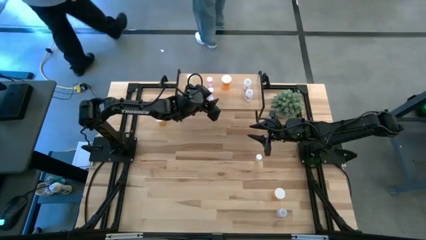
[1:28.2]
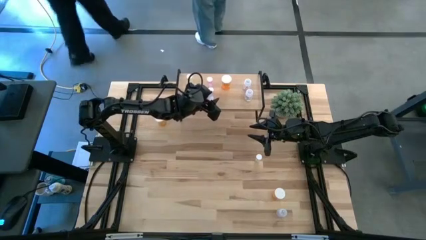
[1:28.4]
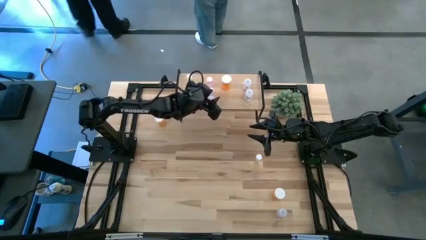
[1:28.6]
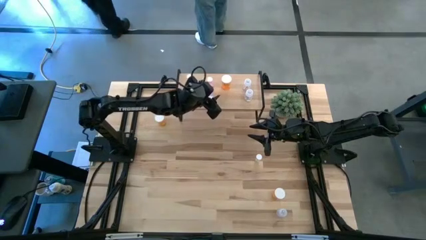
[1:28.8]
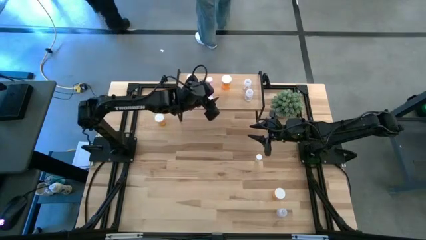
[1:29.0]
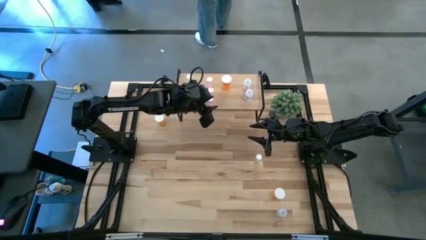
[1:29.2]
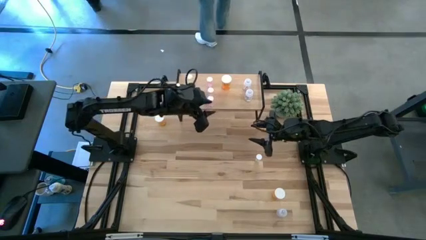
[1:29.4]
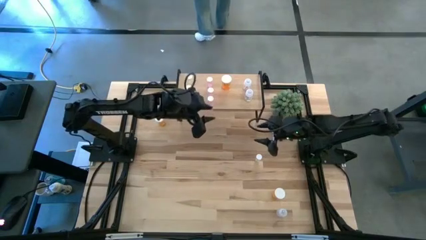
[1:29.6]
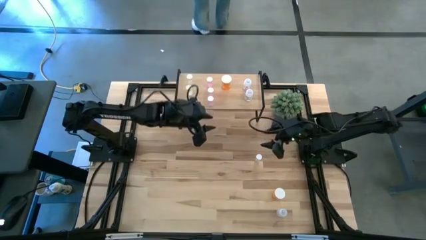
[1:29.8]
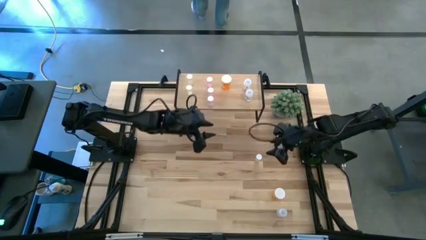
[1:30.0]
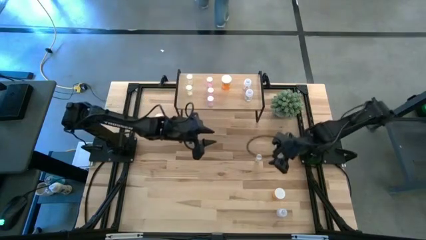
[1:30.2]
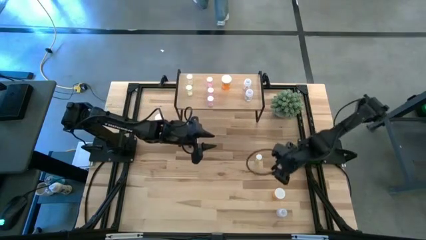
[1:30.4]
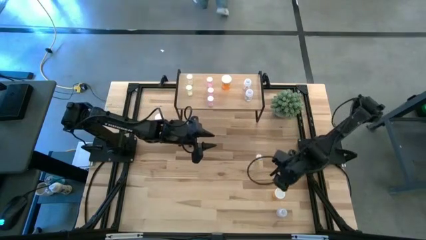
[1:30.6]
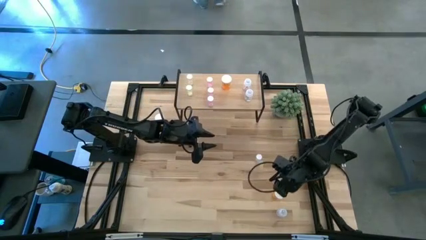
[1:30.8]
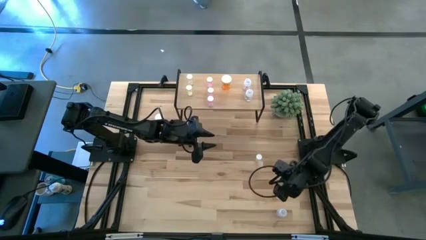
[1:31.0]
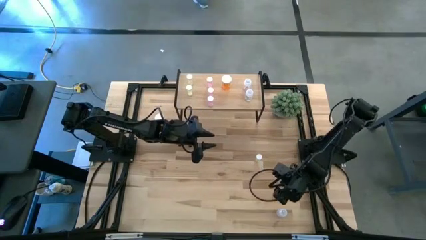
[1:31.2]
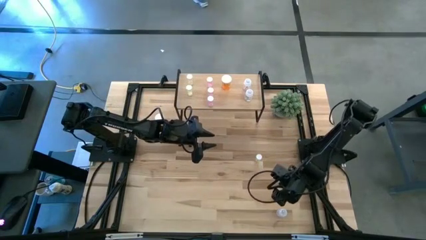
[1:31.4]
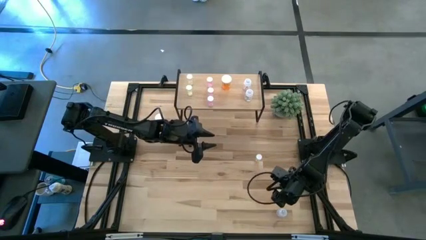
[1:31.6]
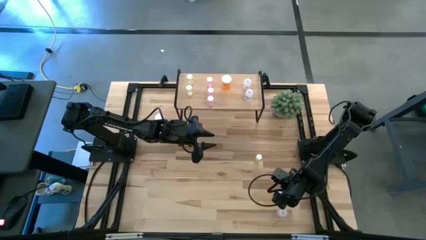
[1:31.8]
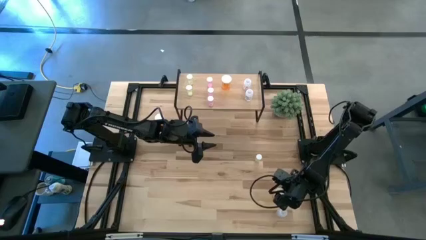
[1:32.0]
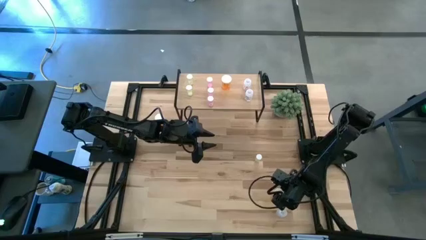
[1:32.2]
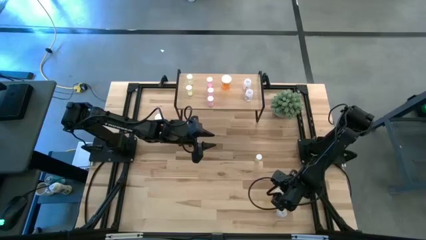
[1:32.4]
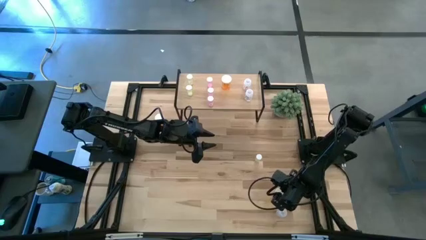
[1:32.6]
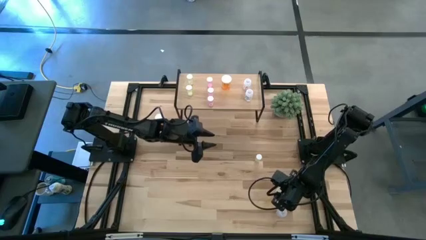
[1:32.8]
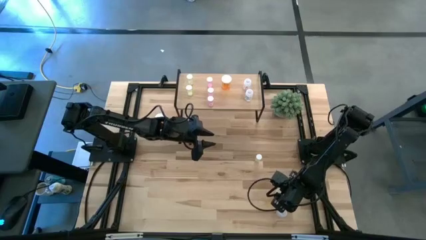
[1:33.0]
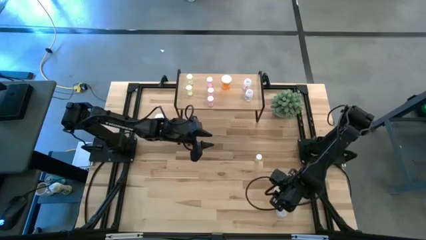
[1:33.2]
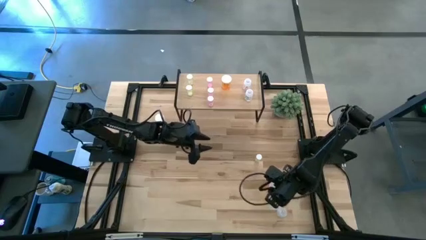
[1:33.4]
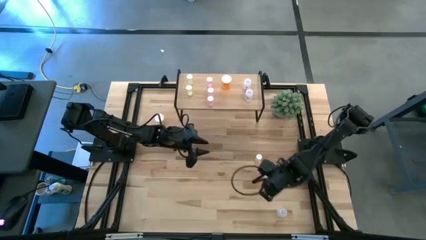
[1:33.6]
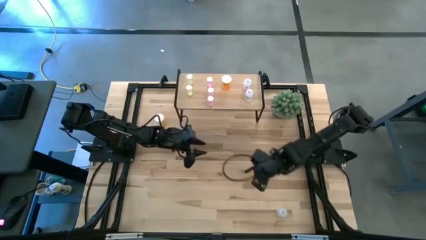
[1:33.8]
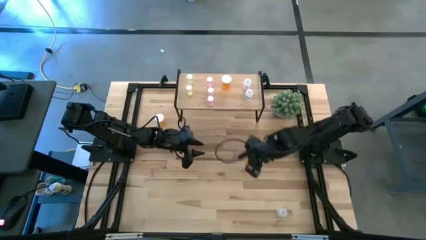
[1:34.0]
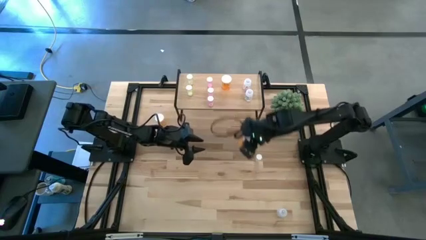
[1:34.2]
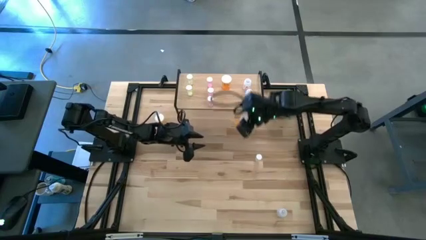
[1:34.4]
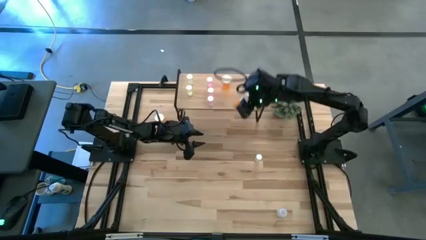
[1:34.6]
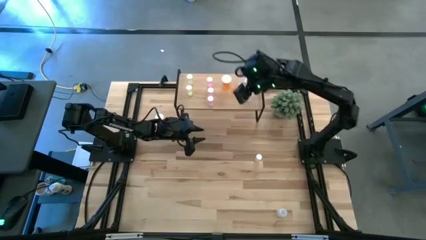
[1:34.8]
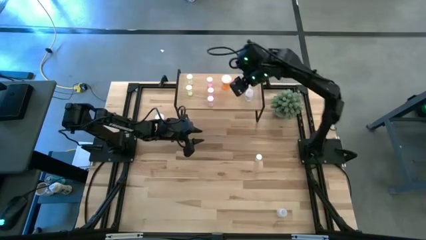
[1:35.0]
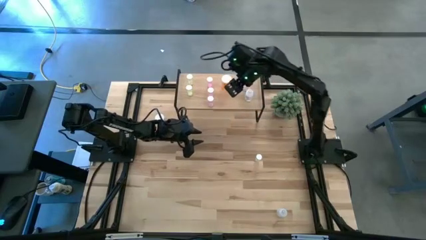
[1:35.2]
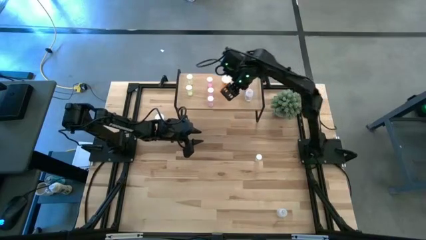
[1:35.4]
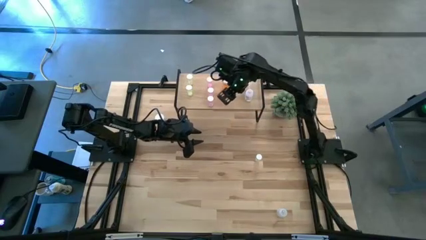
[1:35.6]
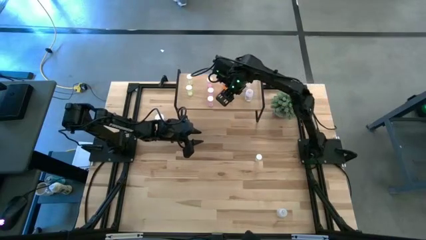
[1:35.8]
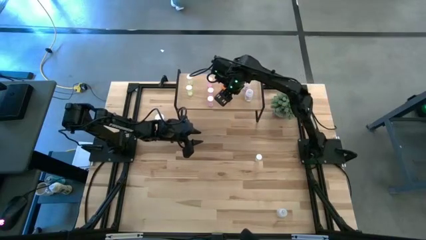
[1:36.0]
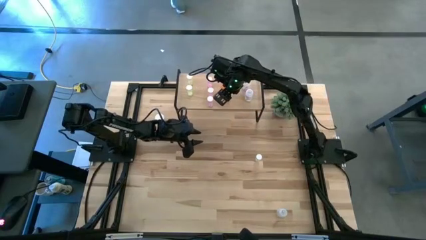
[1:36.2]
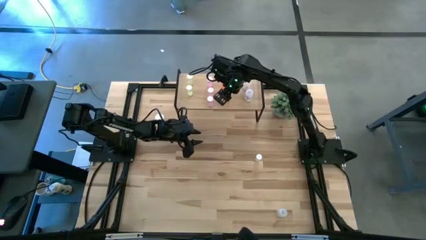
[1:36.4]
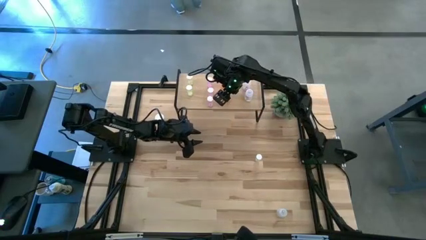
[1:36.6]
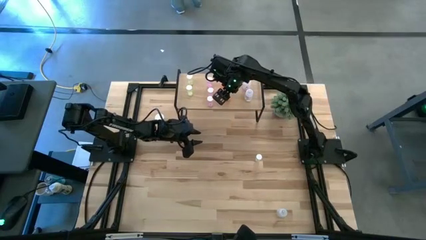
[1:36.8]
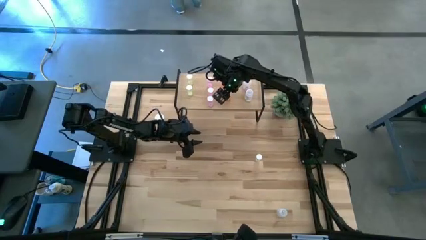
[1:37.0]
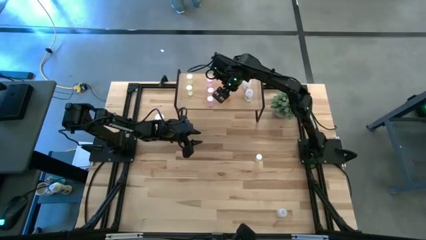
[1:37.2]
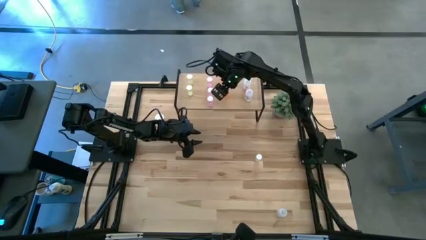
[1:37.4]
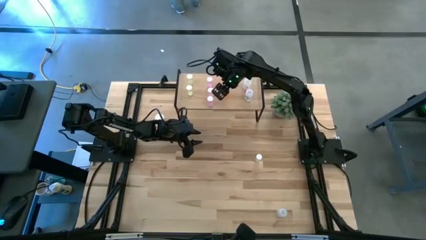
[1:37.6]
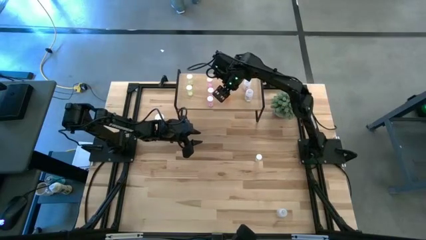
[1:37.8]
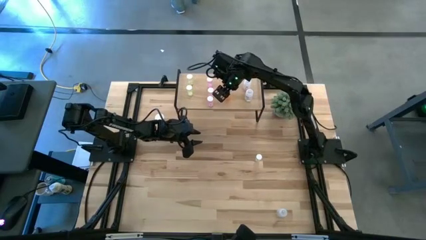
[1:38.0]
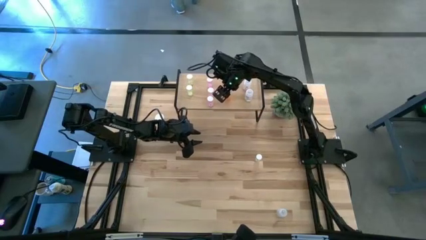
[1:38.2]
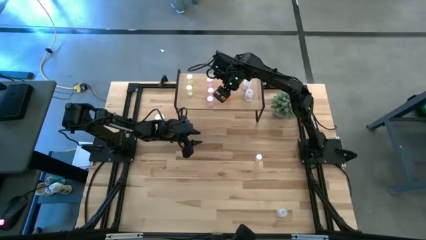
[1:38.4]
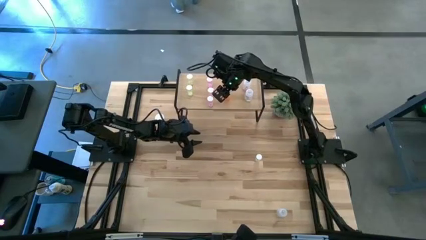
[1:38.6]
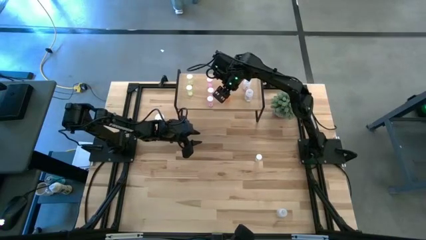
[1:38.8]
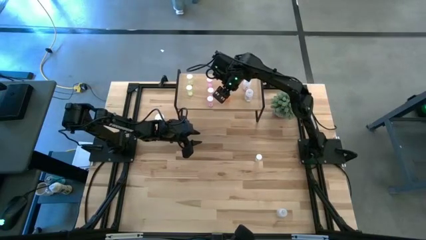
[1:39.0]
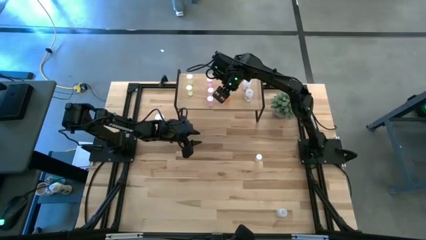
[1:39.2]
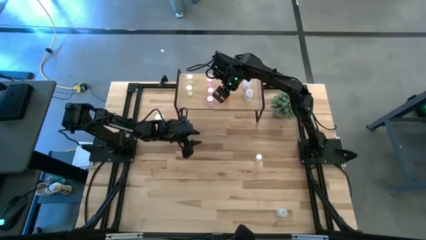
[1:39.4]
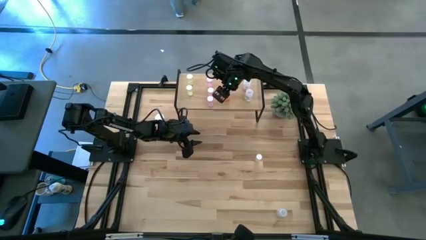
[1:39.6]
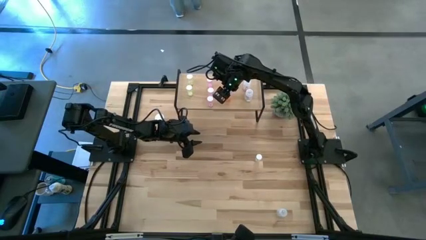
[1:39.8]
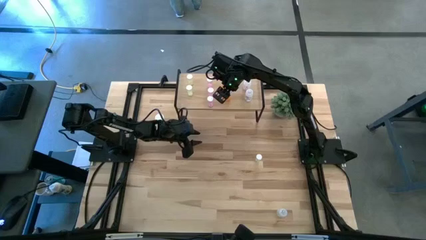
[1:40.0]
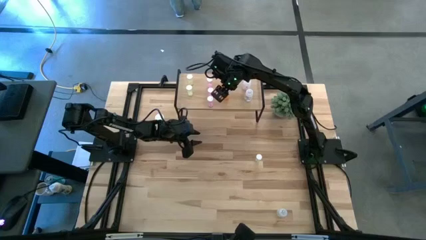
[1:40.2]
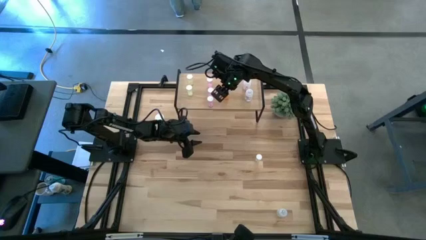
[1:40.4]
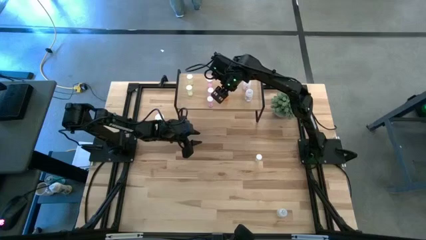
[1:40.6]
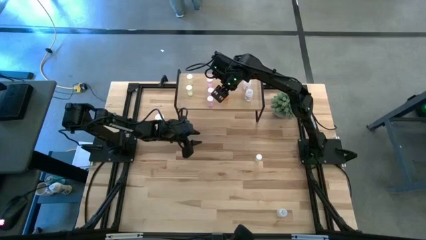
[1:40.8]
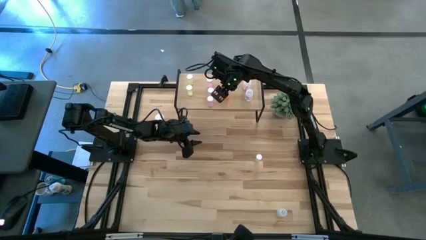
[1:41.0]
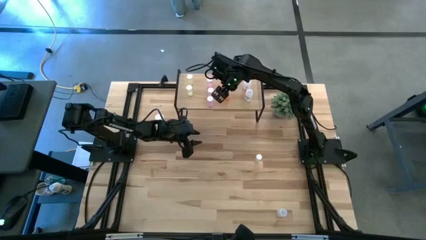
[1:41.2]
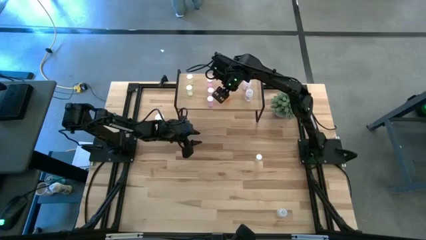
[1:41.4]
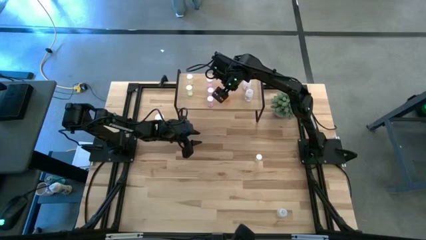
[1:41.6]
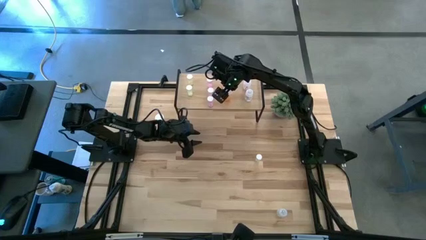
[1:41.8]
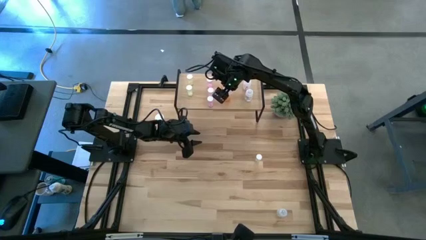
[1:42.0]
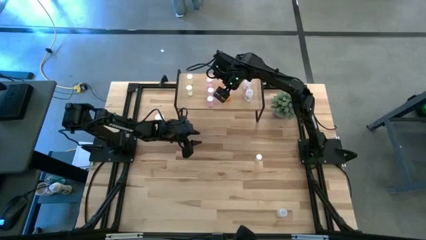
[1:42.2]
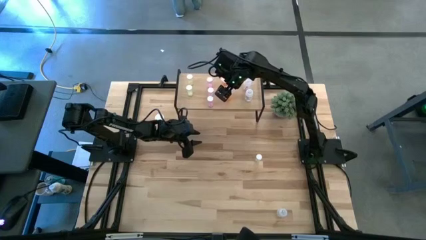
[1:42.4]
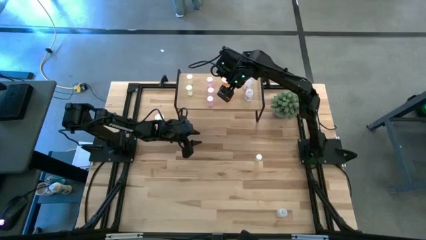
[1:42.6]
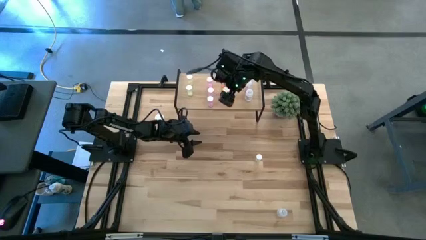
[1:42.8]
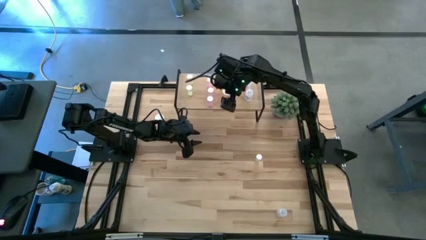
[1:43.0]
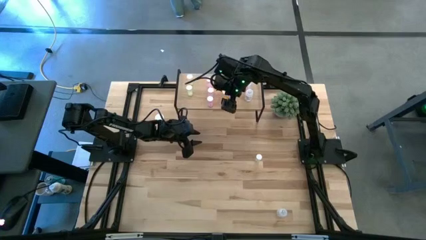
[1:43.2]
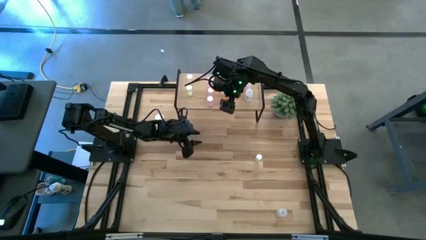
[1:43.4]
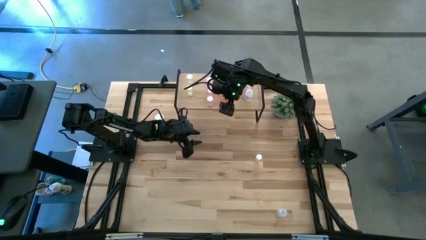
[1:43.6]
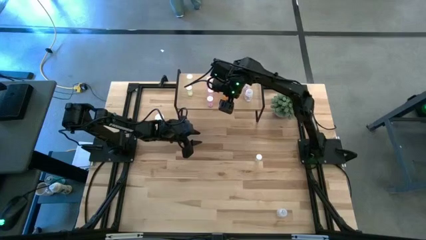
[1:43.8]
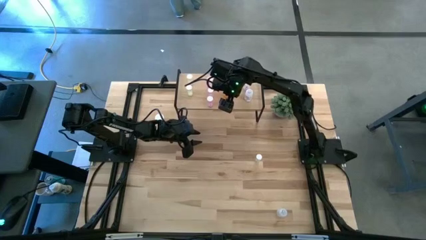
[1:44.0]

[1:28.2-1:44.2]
Task: Pick and place medicine bottles onto shelf by color
Put the bottom orange pill bottle aligned with the other orange pill bottle on the shelf
